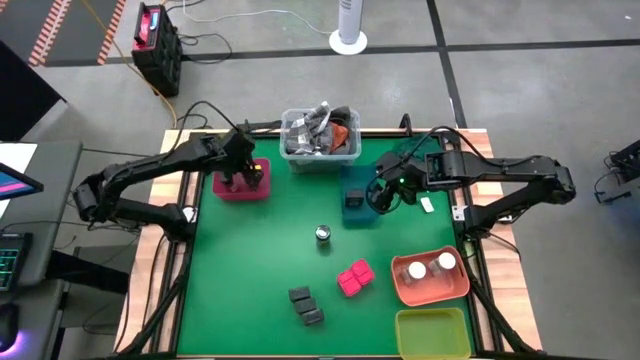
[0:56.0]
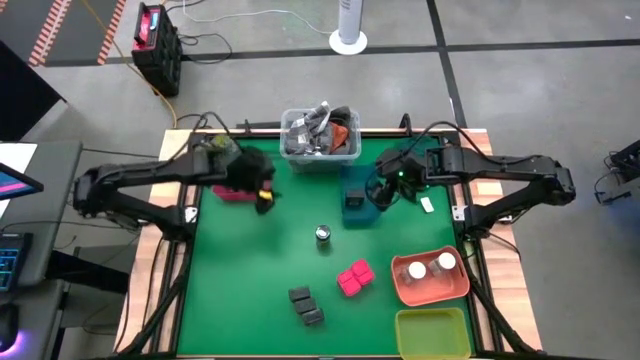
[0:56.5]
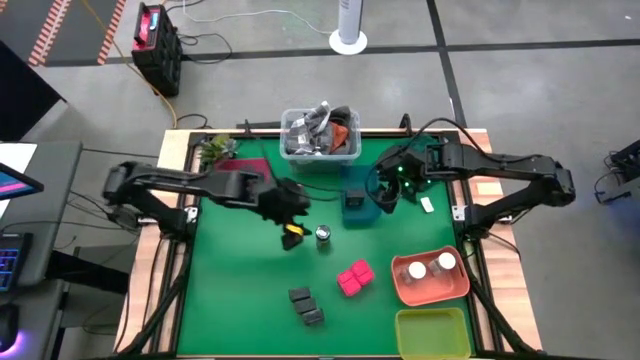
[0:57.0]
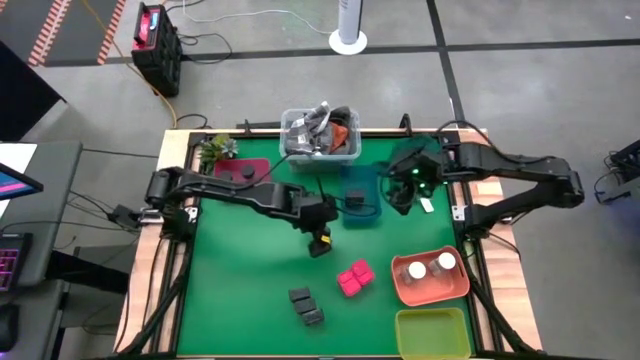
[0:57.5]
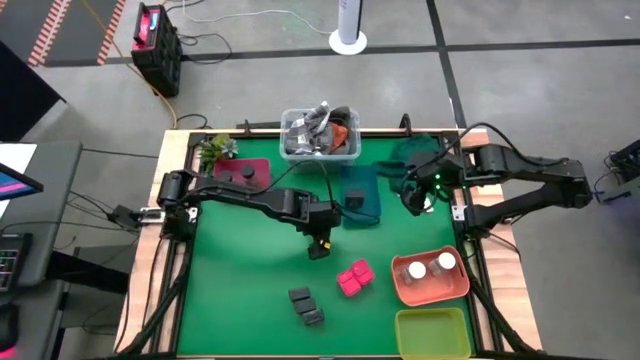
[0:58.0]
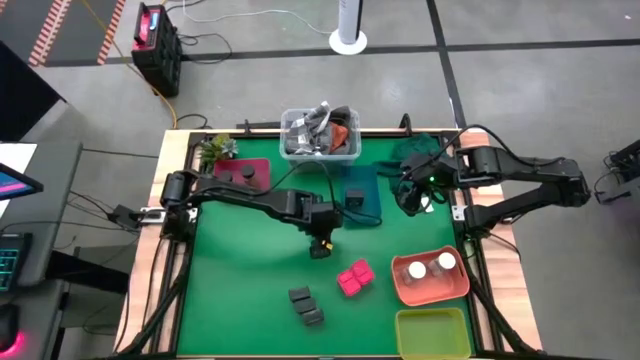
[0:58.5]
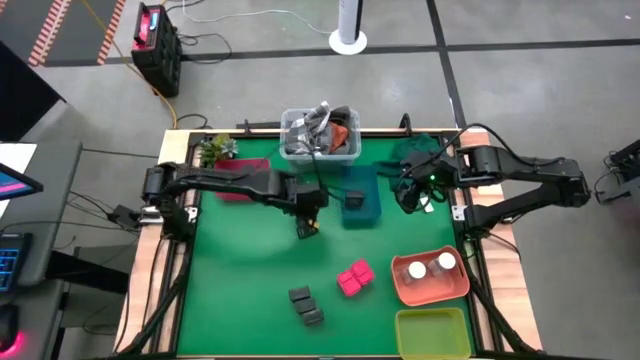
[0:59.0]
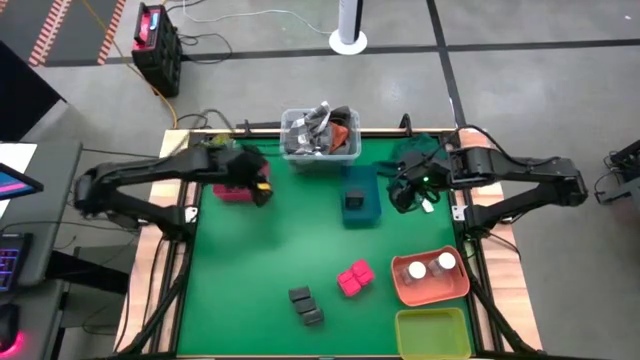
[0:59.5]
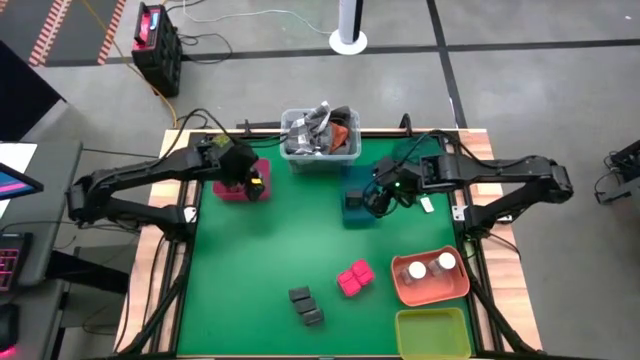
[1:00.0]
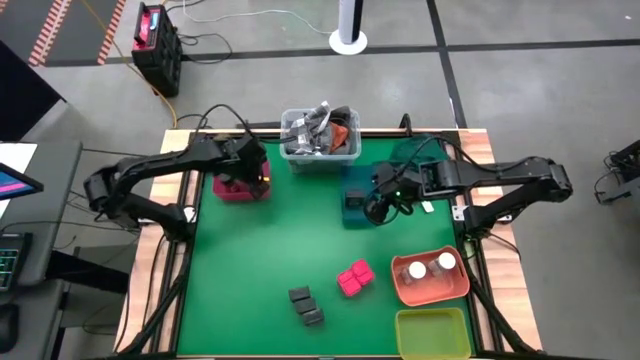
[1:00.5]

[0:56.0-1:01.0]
Task: Sort spices by type
Put the black seasoning bottle into the pink bin

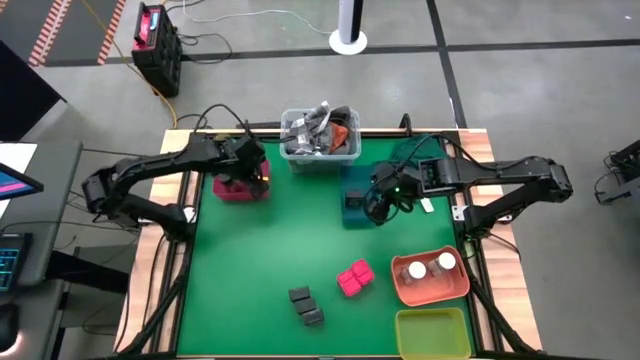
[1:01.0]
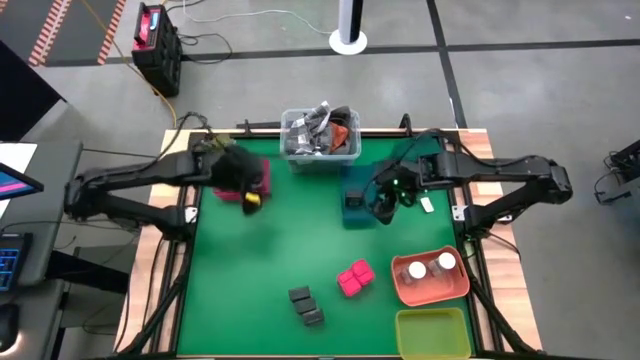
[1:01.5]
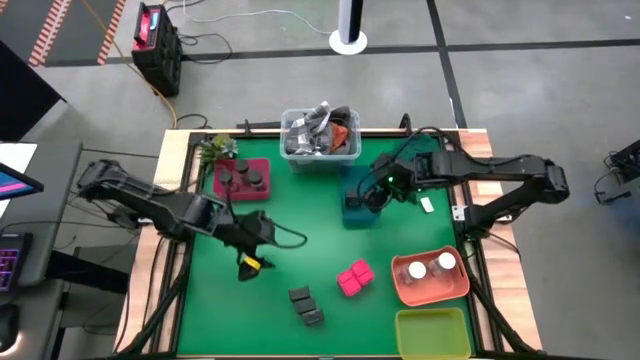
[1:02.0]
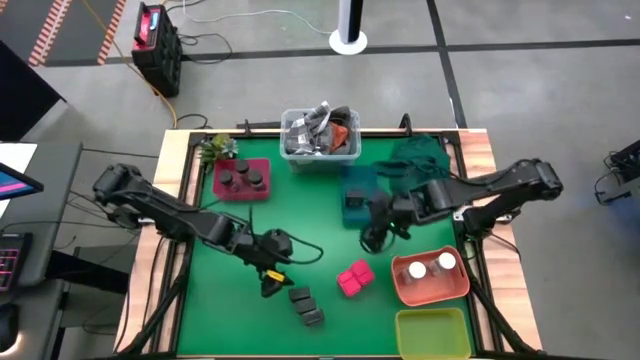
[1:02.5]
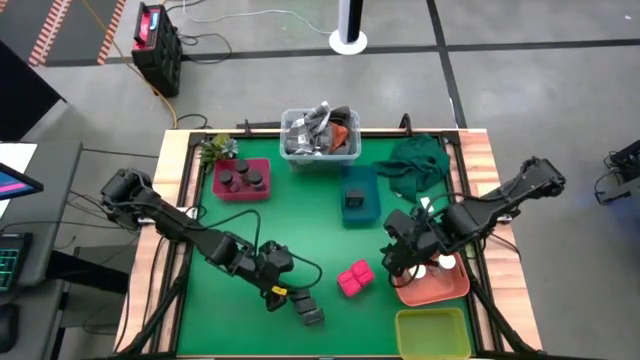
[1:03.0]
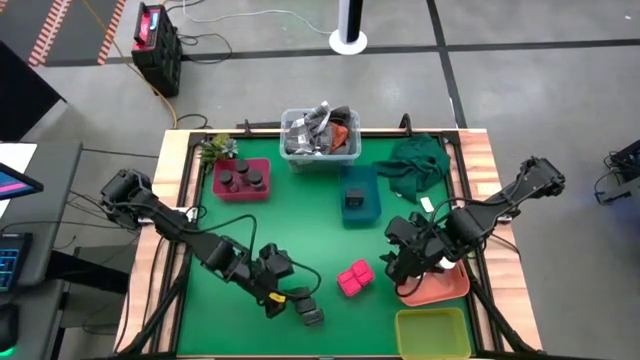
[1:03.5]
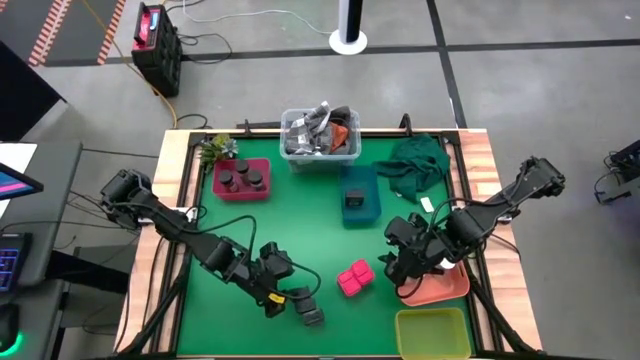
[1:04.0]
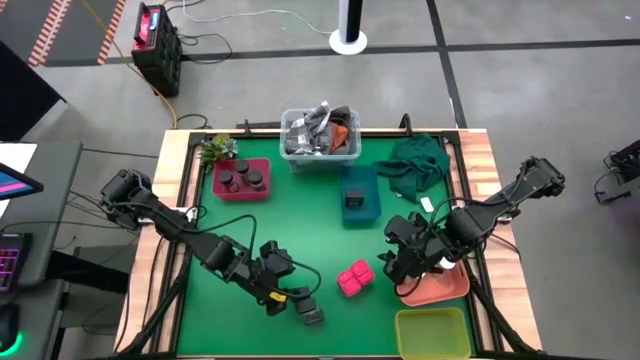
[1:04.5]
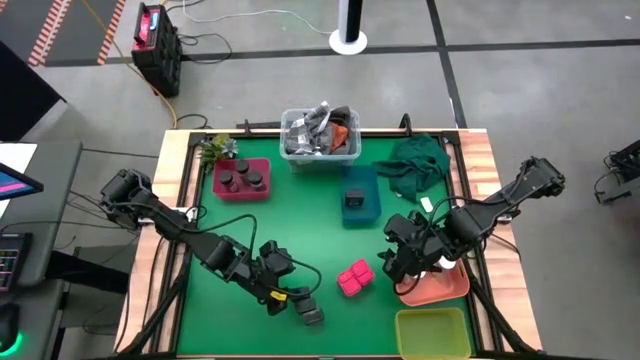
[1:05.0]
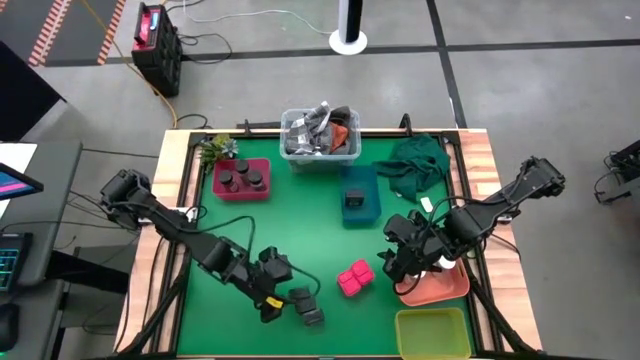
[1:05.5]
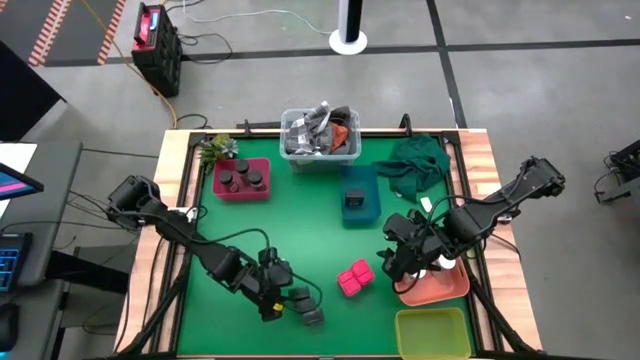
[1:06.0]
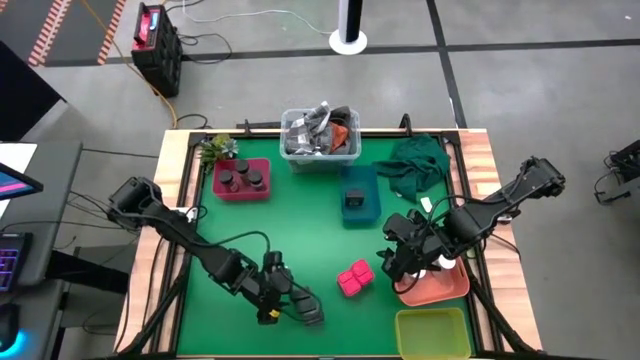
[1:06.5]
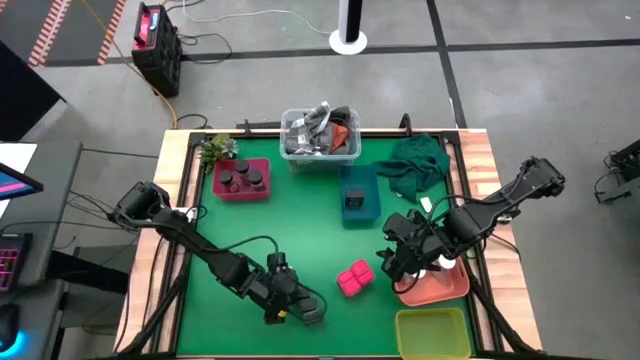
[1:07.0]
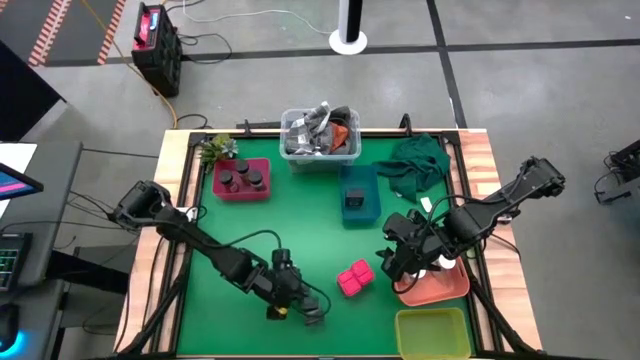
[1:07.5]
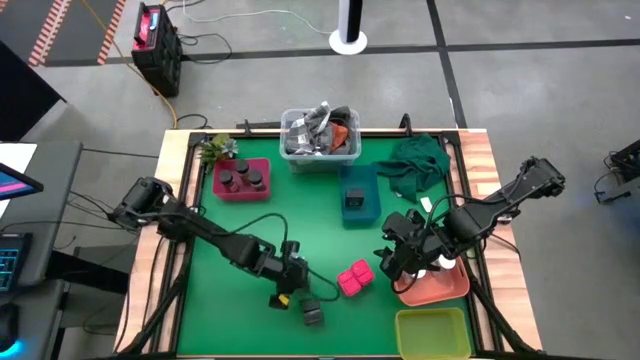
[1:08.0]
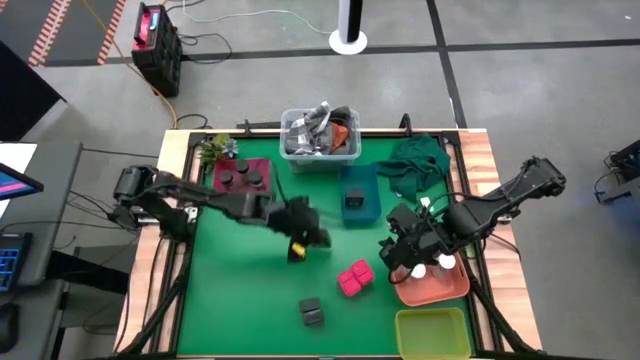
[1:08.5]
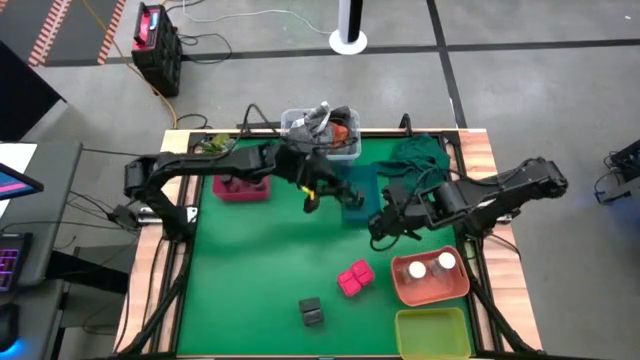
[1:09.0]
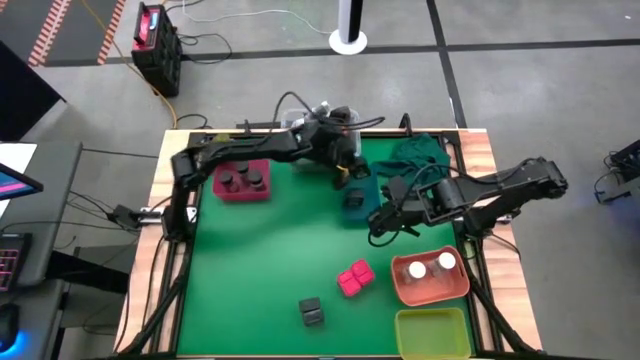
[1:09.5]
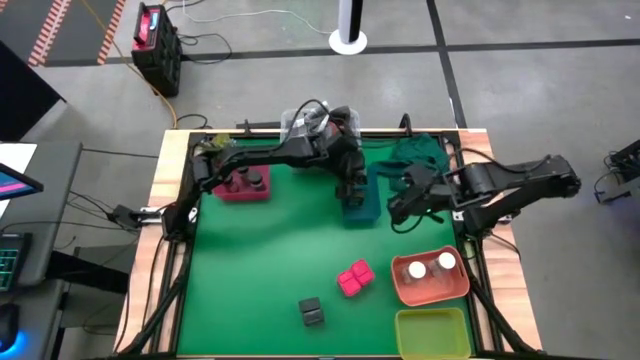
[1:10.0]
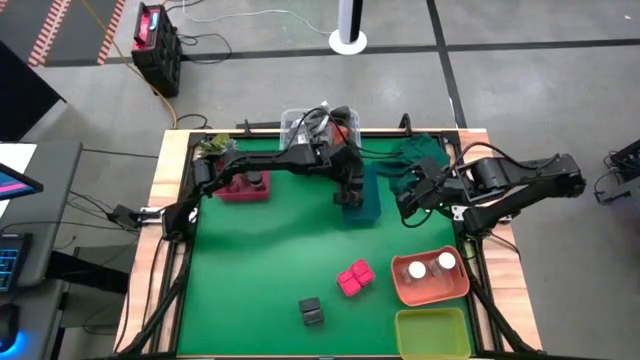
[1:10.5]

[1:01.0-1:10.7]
Put the black seasoning can into the blue bin

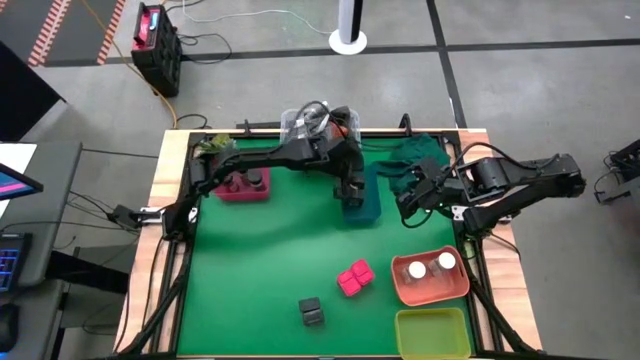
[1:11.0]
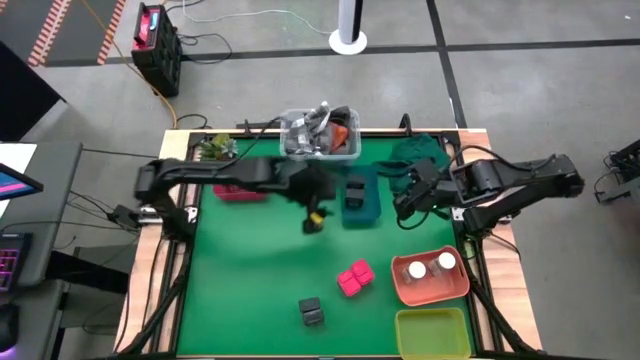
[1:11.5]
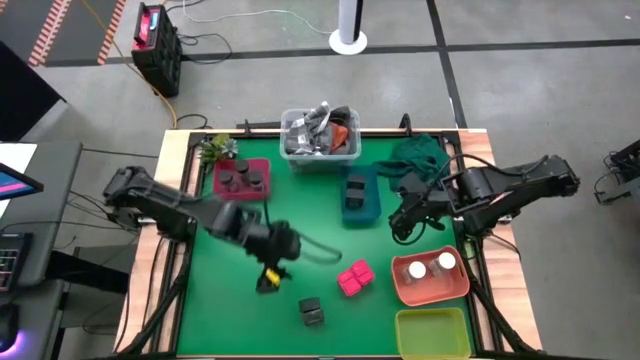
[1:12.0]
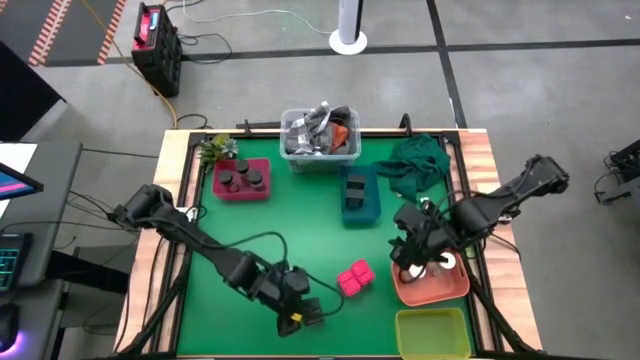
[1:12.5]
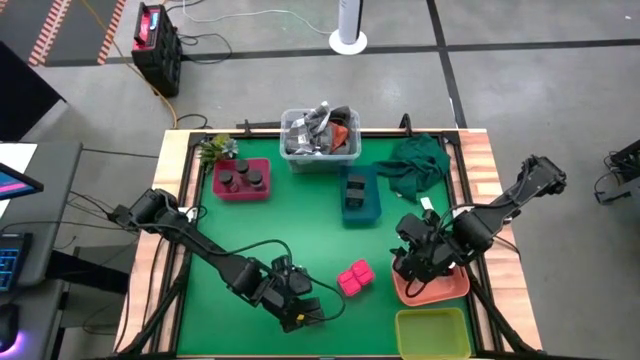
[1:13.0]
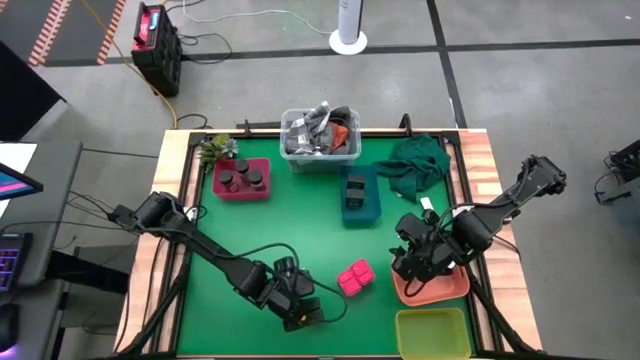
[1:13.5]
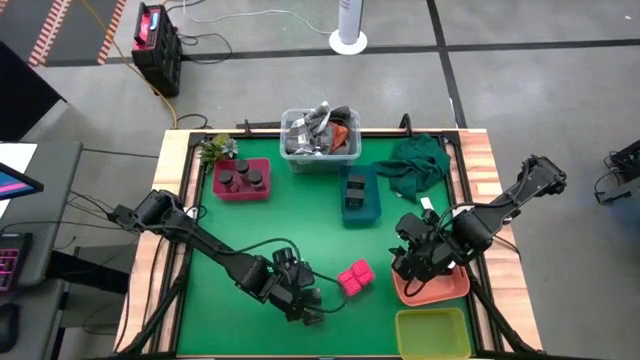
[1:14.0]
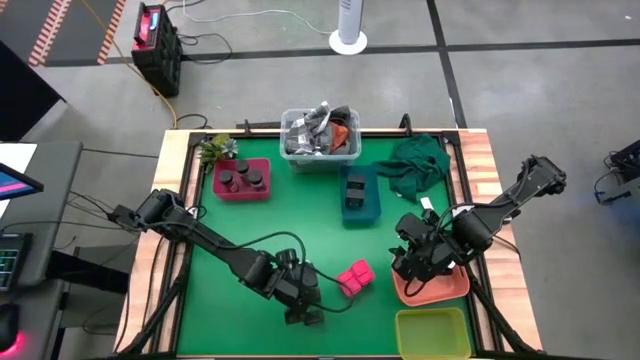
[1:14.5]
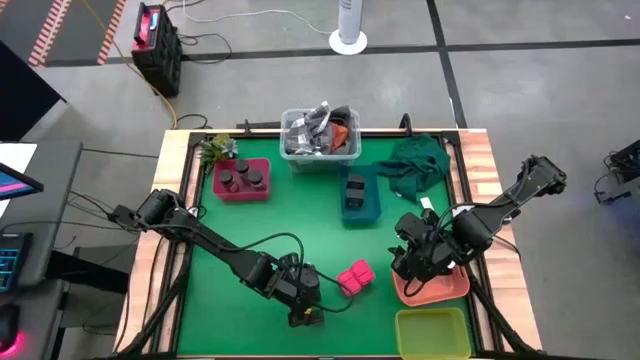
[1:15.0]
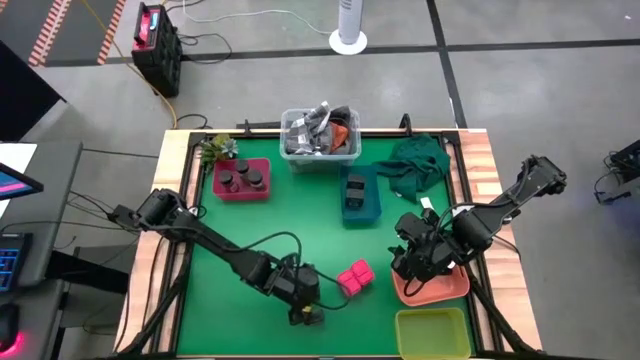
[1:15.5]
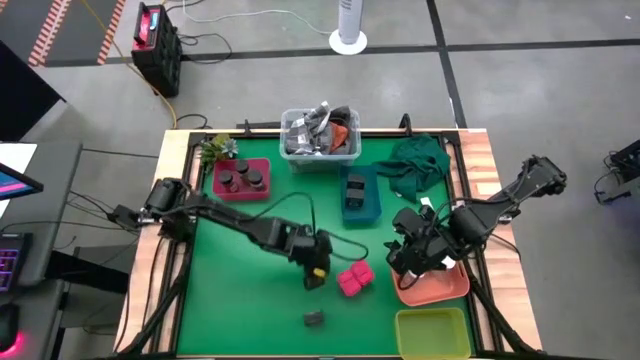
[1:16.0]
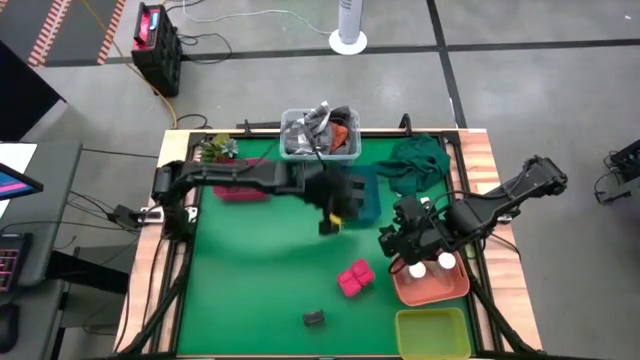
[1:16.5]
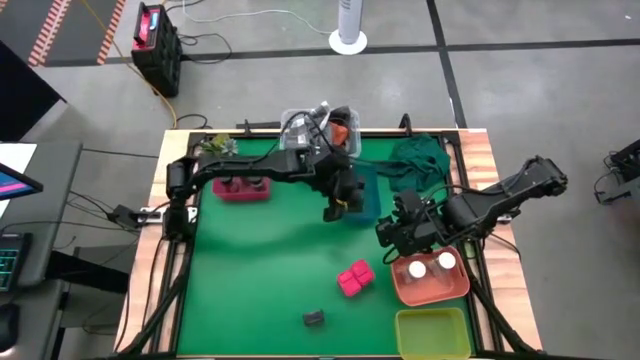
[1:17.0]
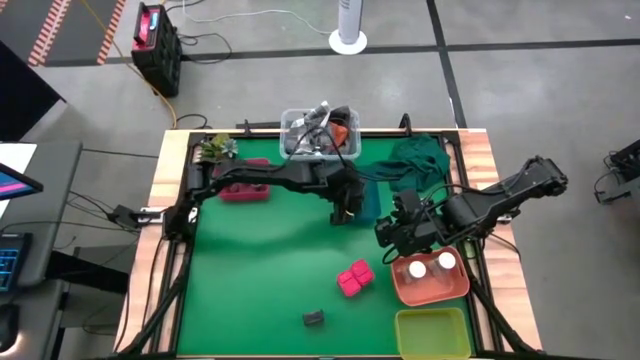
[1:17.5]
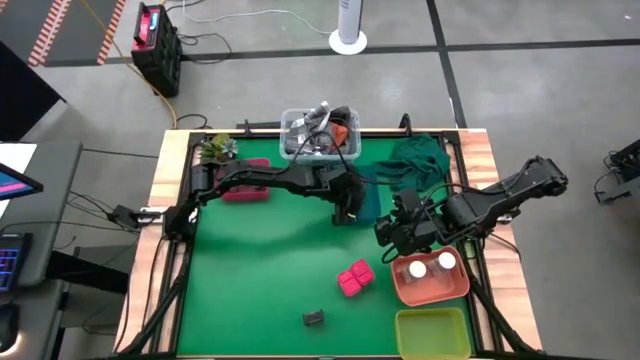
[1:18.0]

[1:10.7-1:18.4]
Put the black seasoning can into the blue bin
